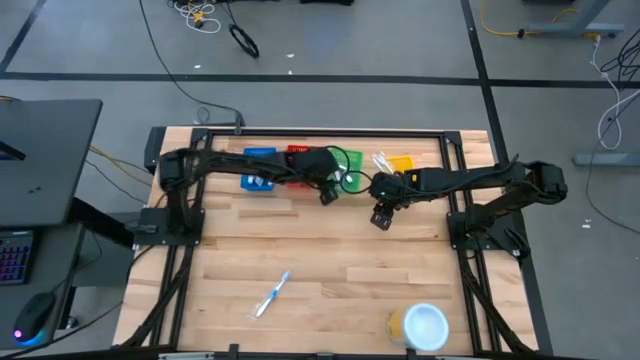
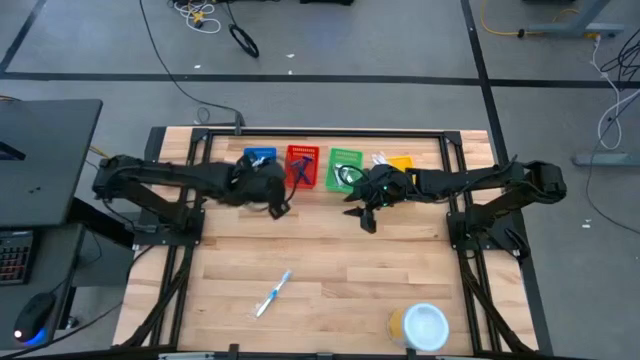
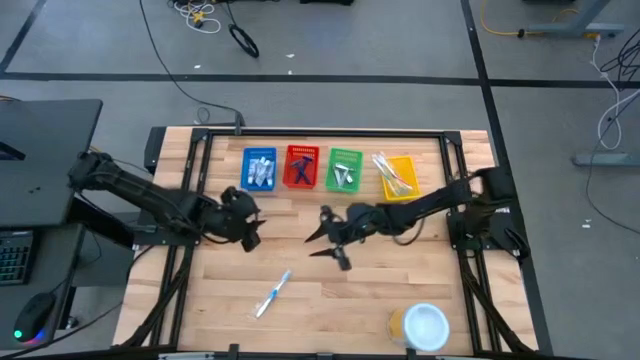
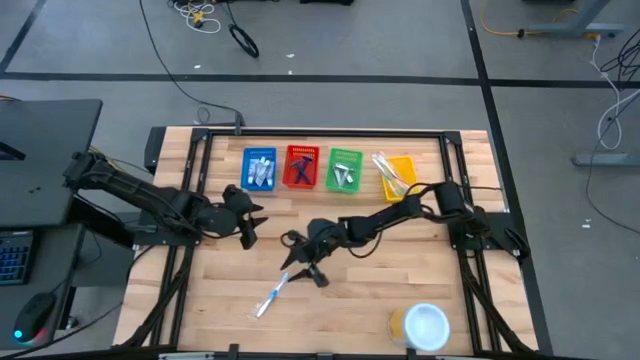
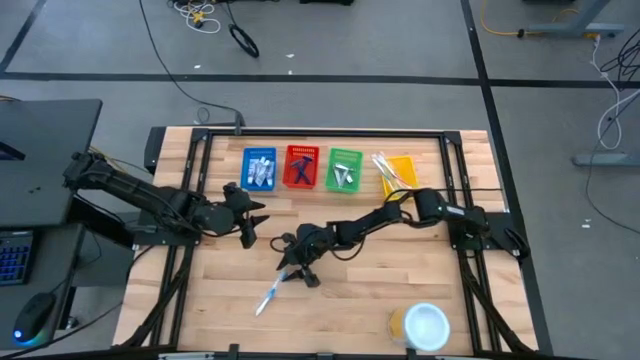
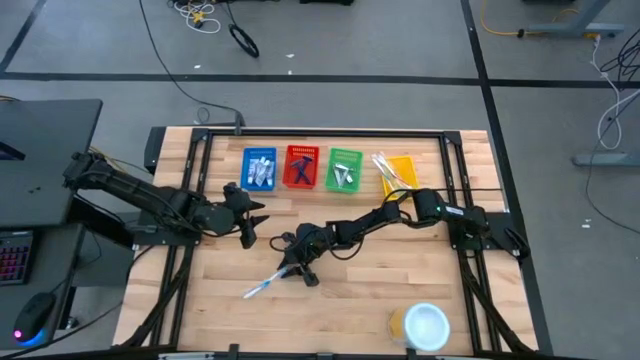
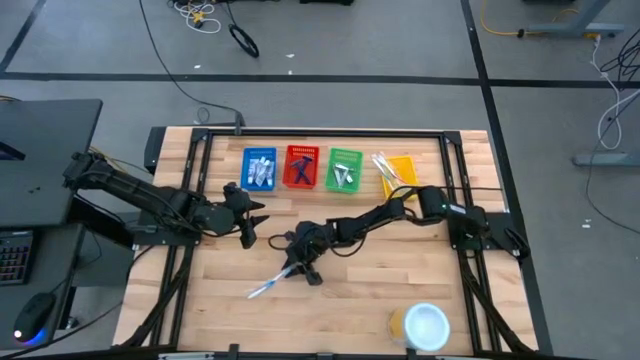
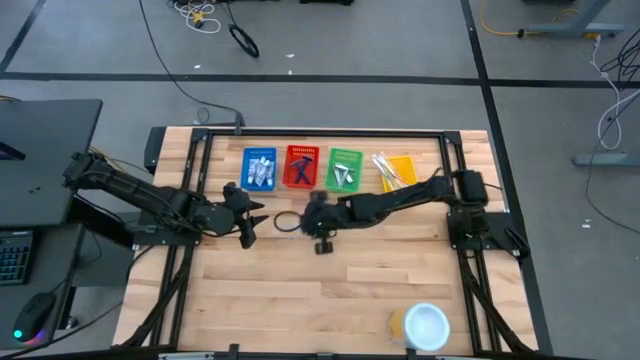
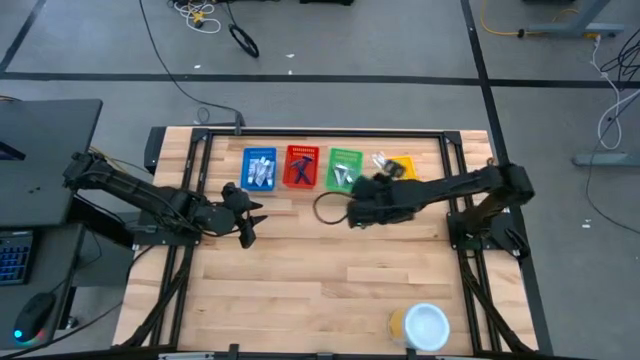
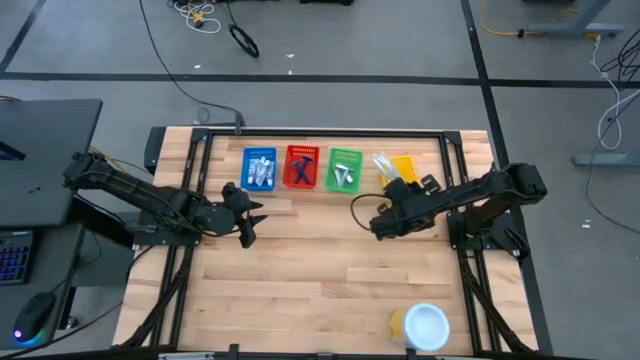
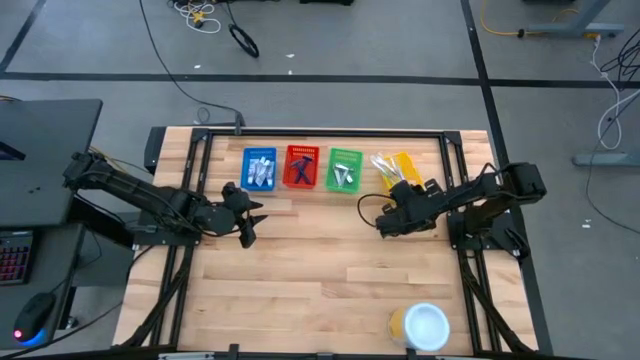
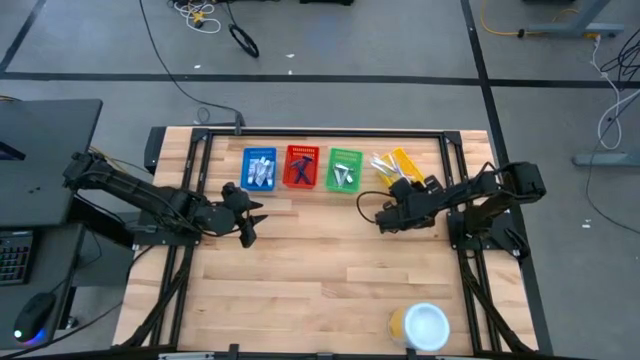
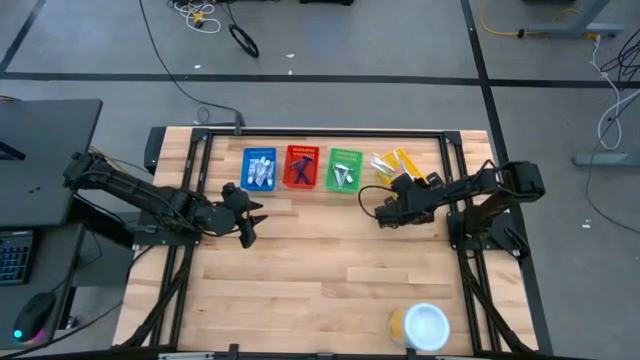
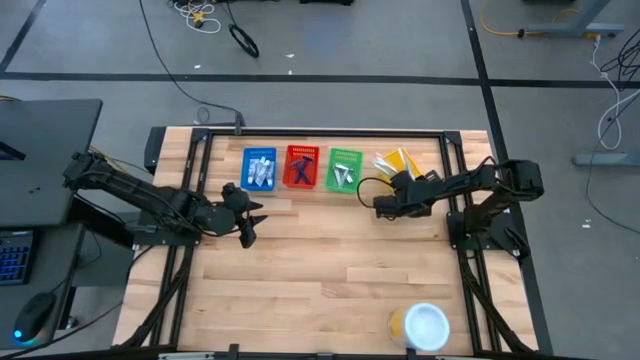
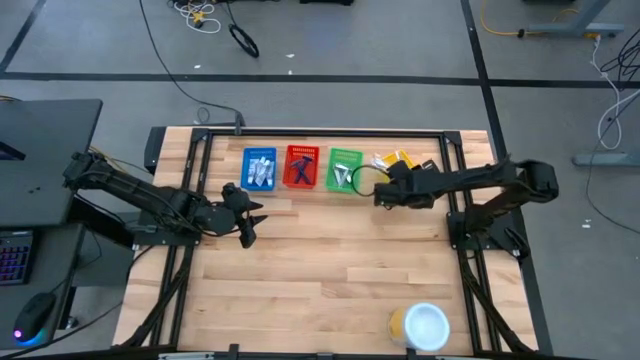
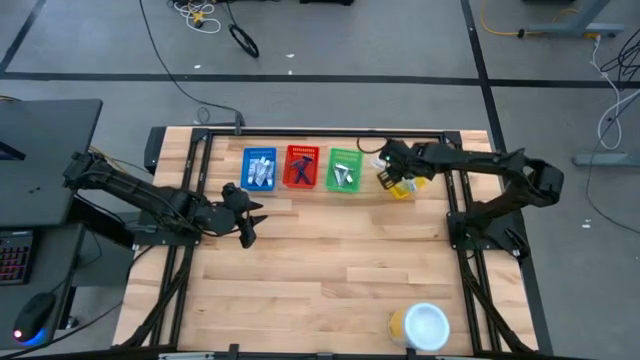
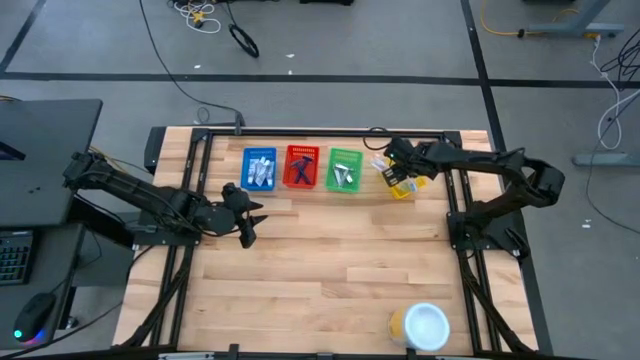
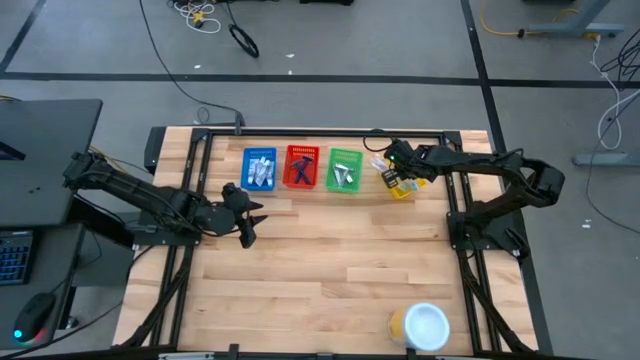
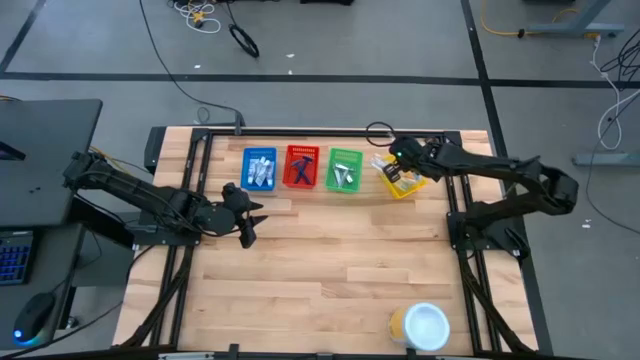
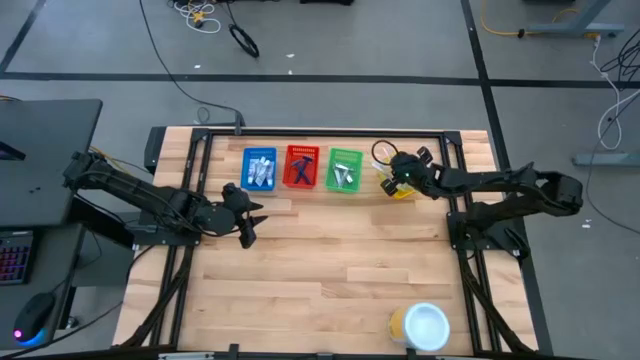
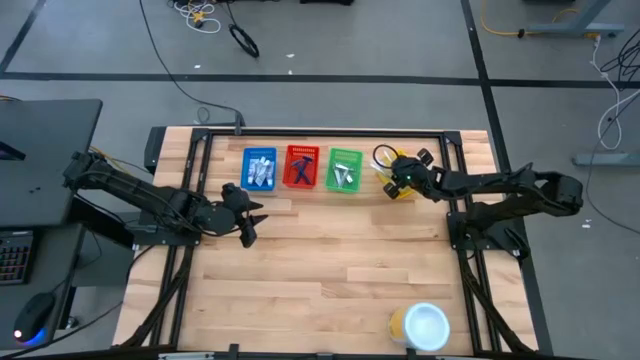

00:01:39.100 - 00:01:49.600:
Task: Pick & Place Travel size toiletries
Put the blue toothbrush into the yellow bin

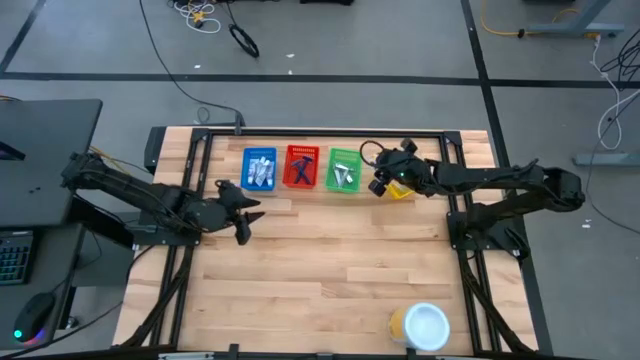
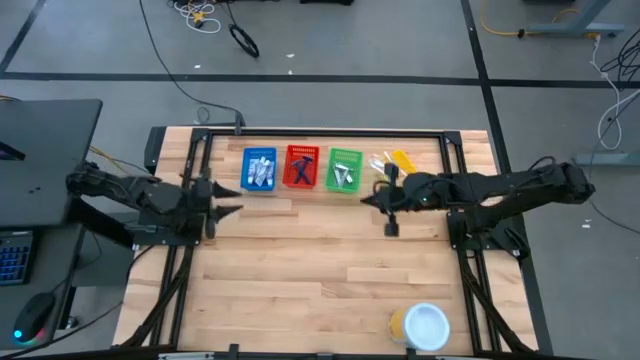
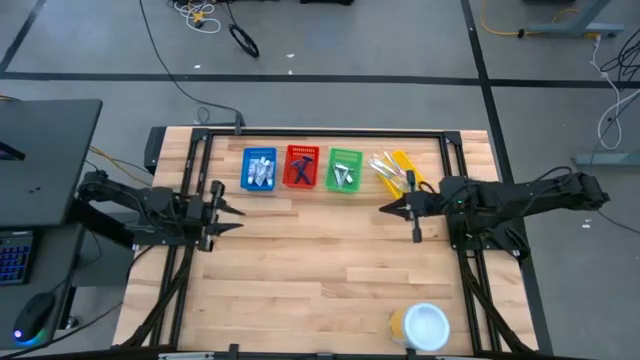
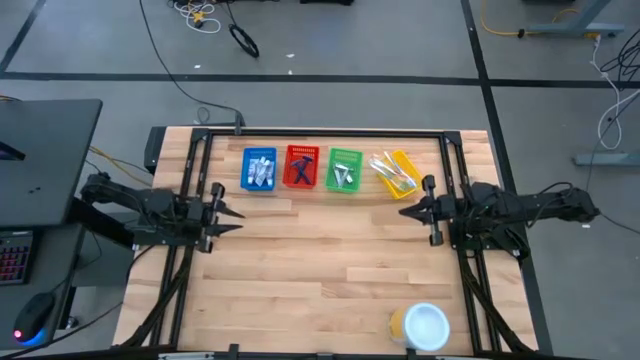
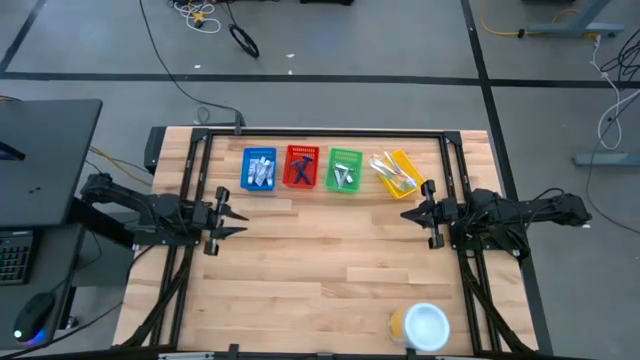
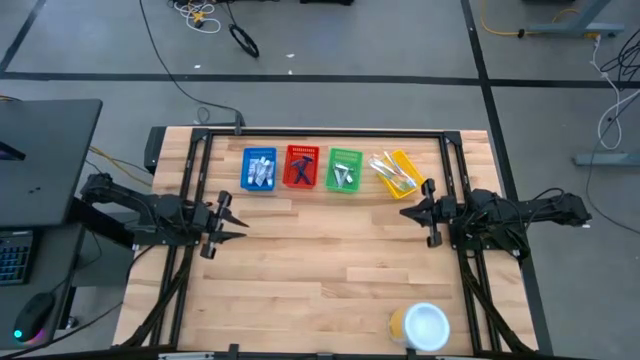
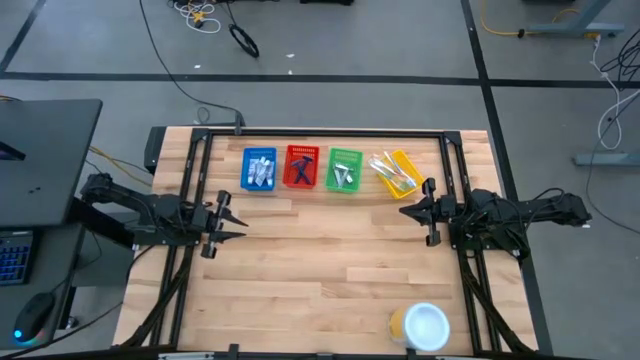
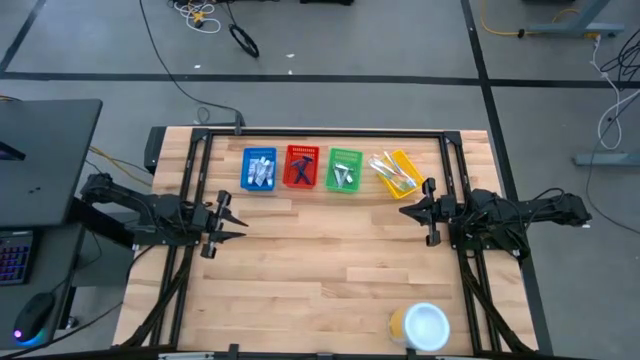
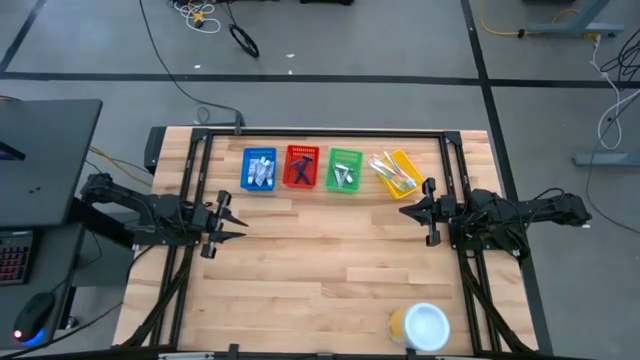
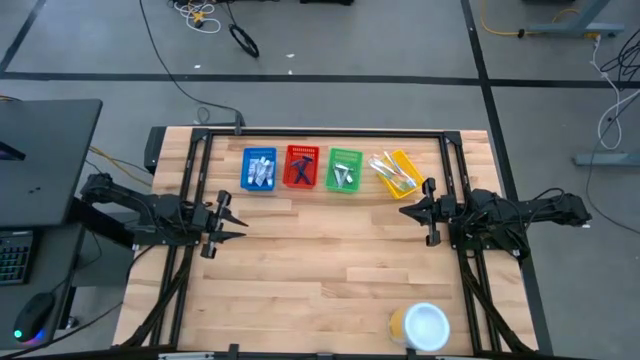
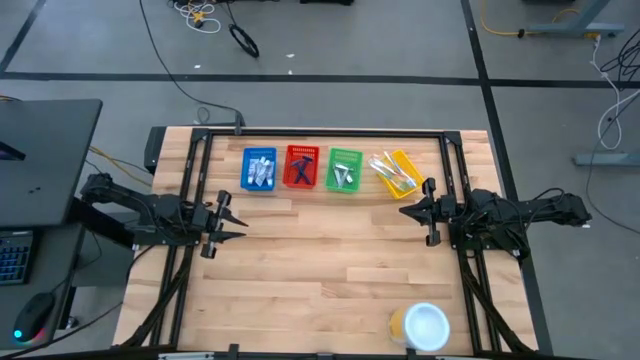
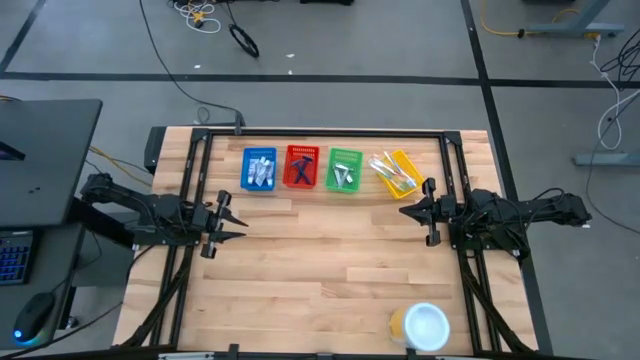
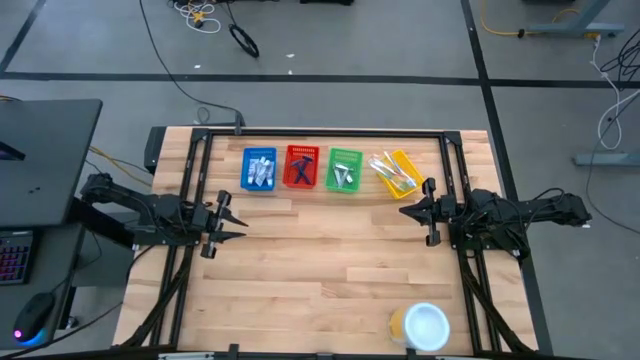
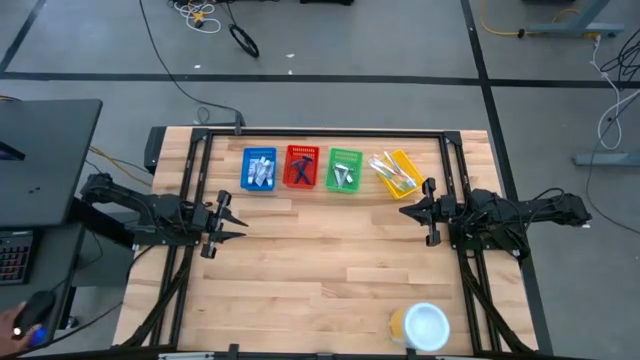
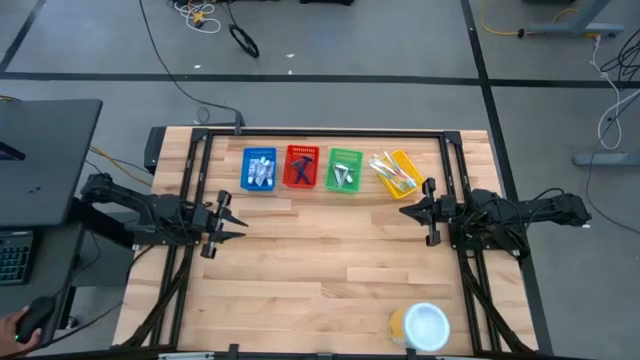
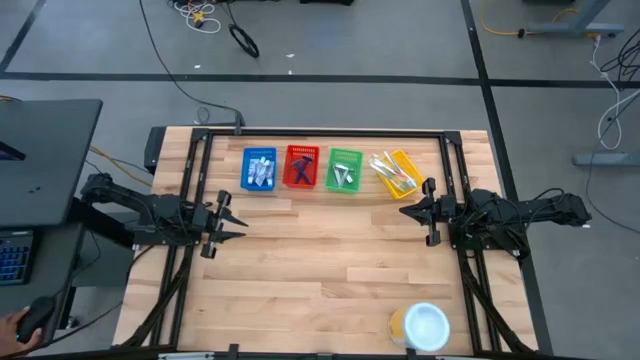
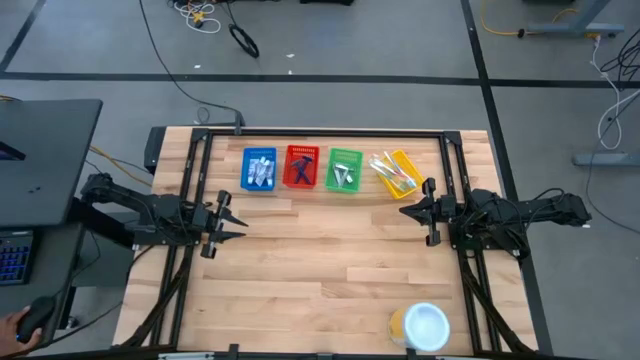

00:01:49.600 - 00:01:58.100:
Return to Home Position

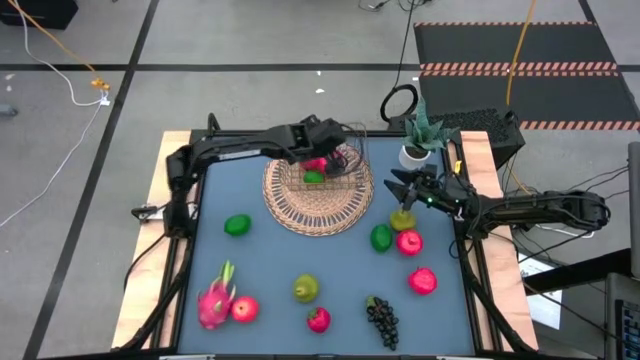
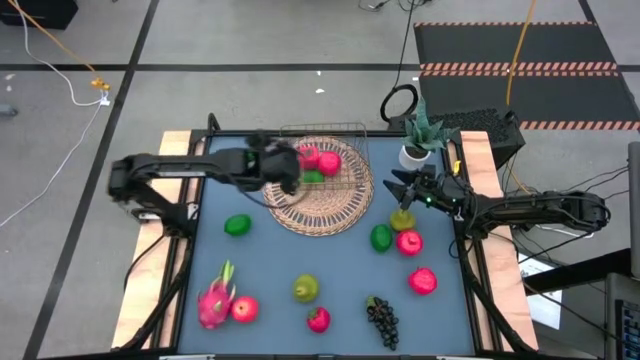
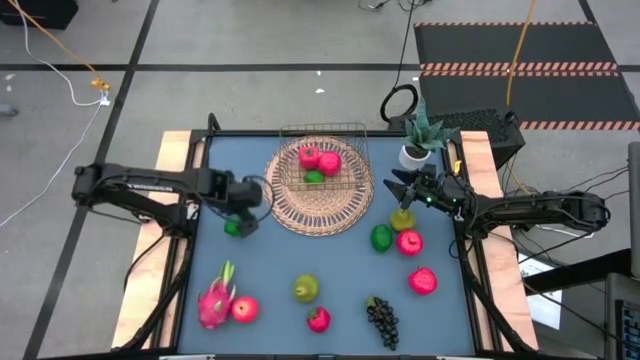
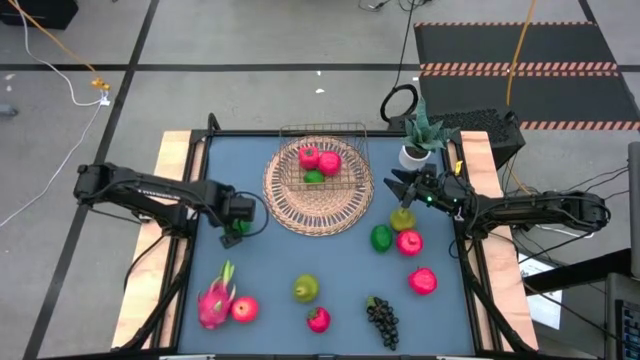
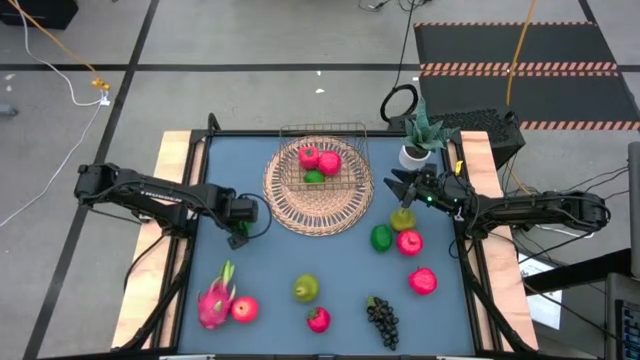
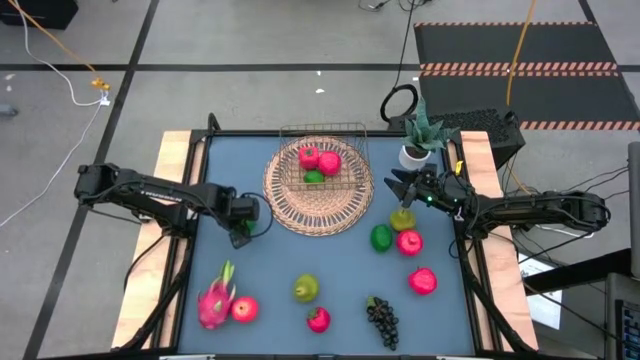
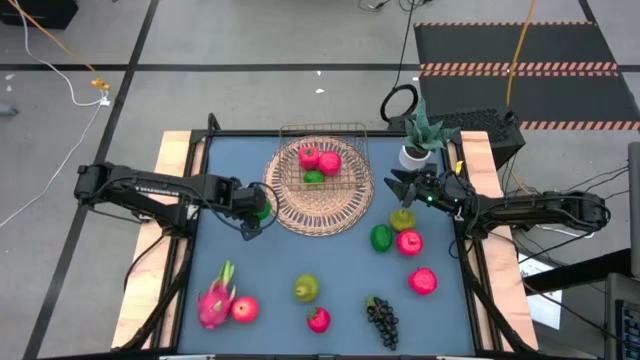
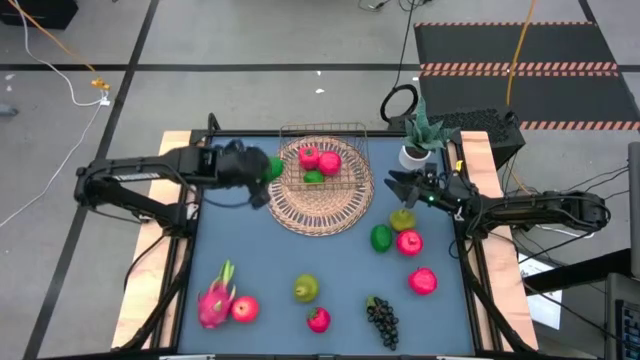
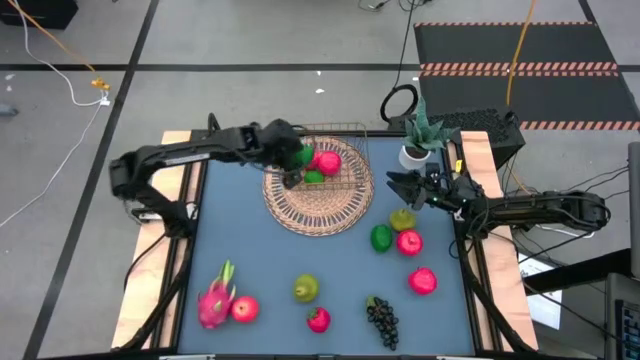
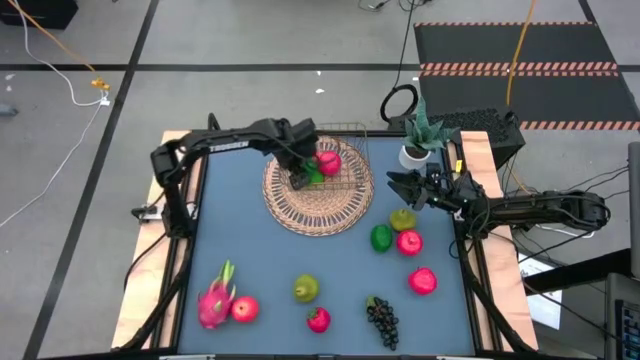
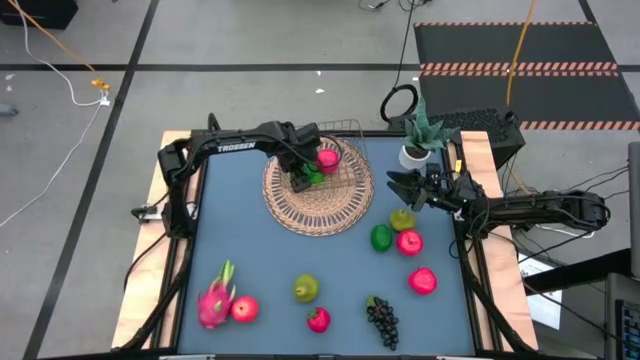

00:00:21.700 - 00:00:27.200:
Task: Build produce basket
Put the green lime into the gold wire basket
